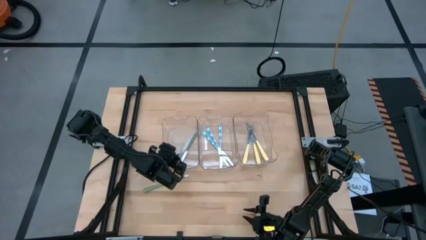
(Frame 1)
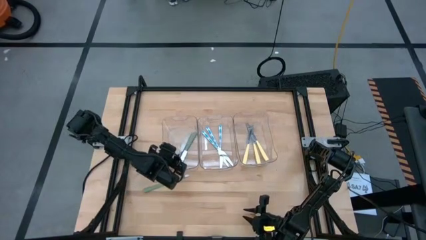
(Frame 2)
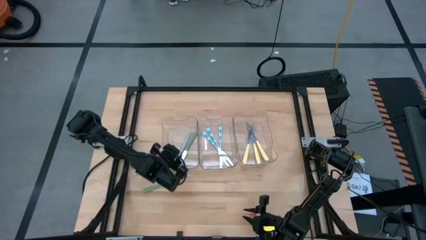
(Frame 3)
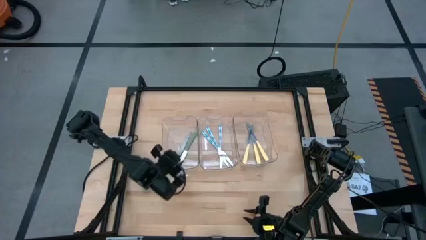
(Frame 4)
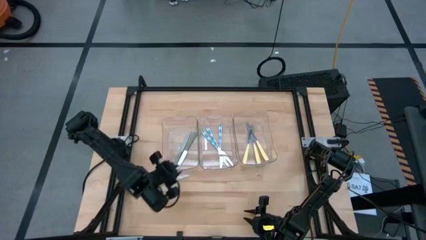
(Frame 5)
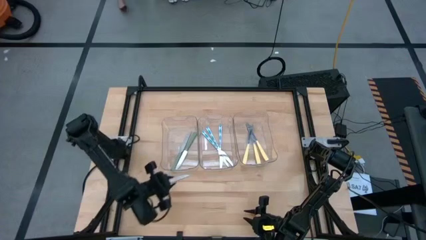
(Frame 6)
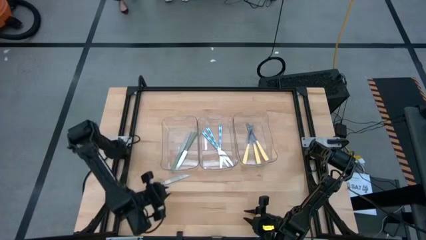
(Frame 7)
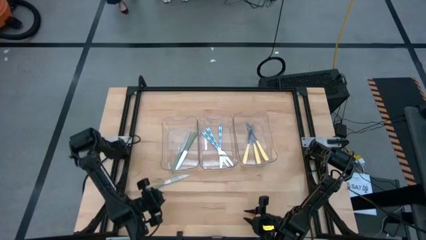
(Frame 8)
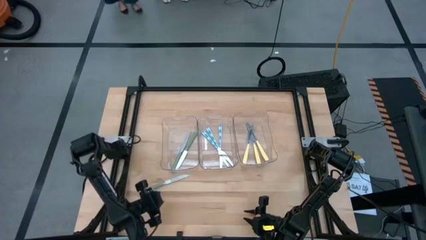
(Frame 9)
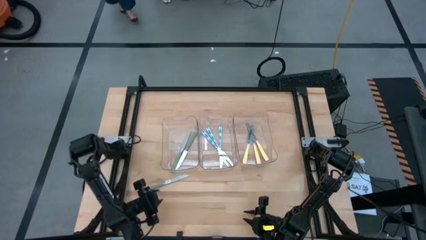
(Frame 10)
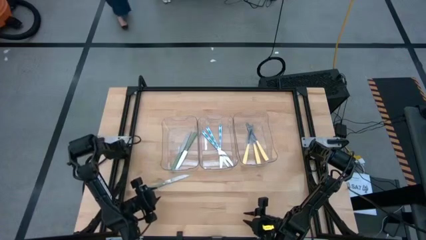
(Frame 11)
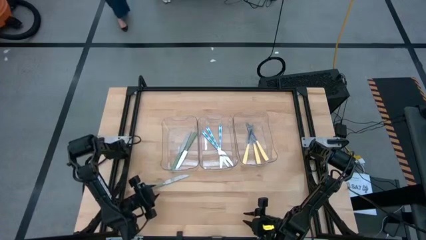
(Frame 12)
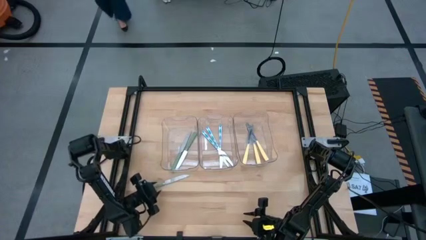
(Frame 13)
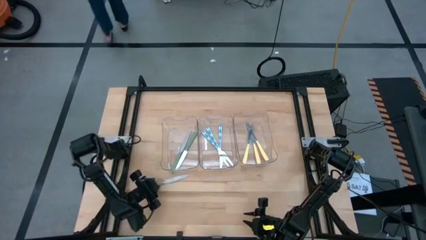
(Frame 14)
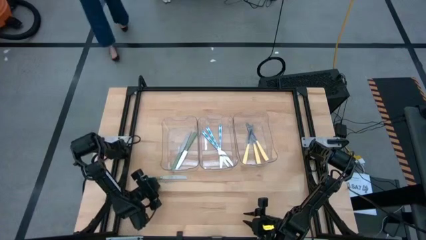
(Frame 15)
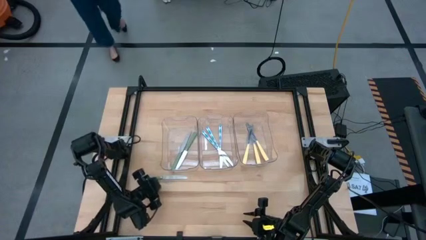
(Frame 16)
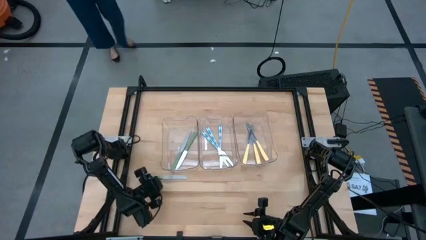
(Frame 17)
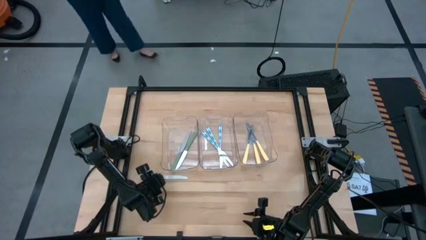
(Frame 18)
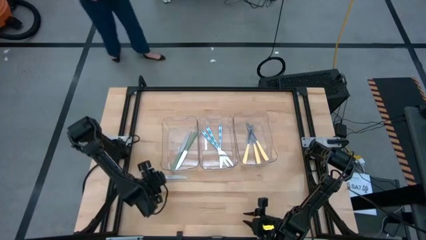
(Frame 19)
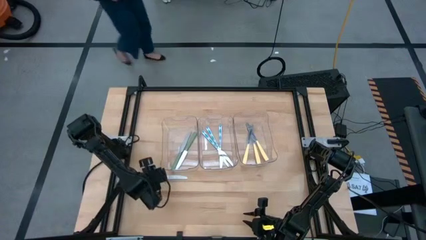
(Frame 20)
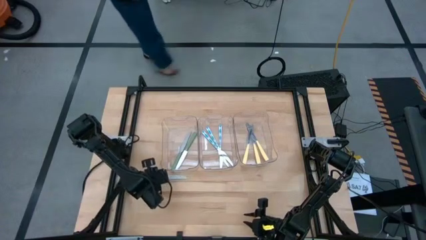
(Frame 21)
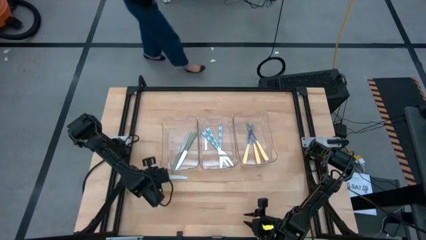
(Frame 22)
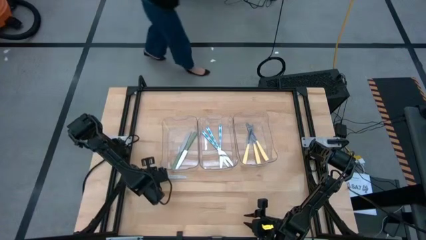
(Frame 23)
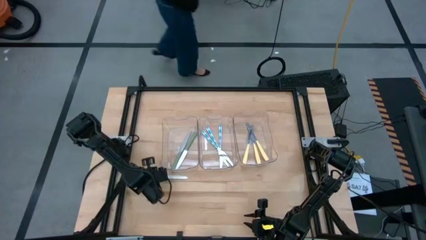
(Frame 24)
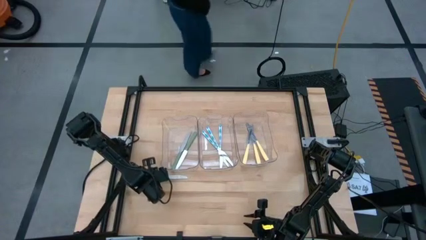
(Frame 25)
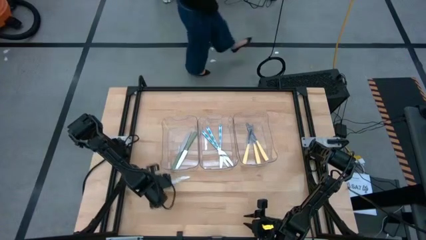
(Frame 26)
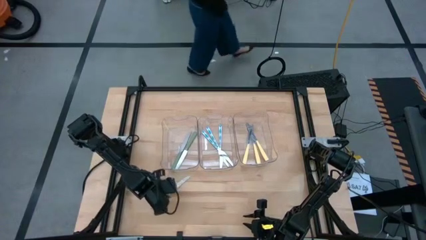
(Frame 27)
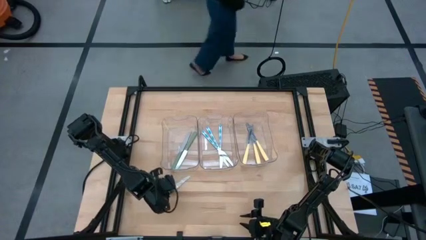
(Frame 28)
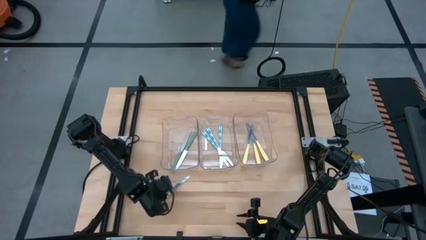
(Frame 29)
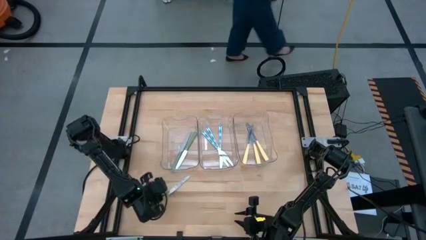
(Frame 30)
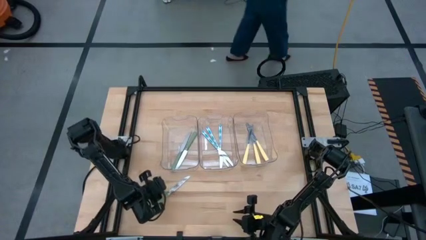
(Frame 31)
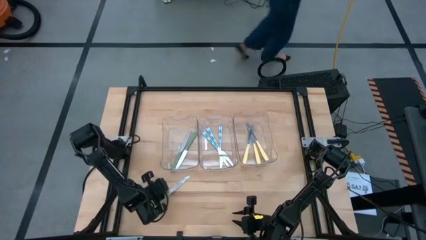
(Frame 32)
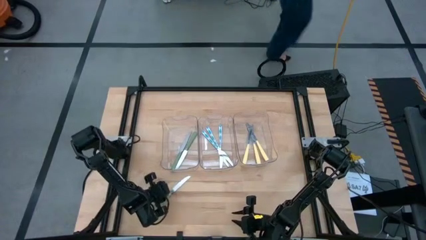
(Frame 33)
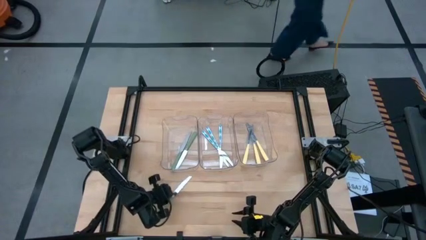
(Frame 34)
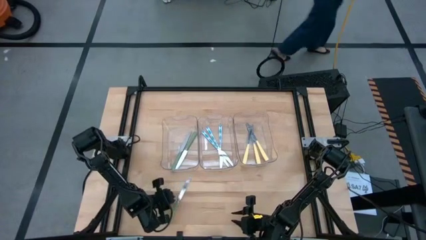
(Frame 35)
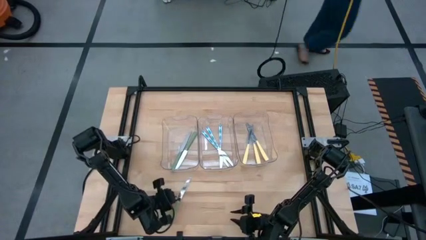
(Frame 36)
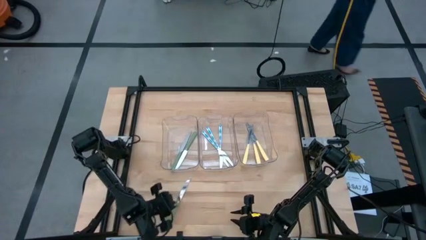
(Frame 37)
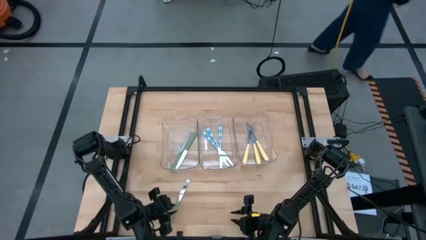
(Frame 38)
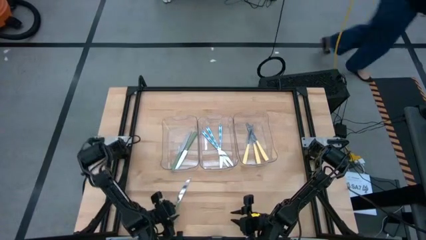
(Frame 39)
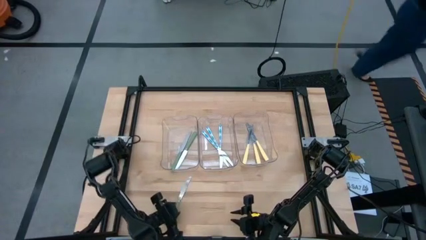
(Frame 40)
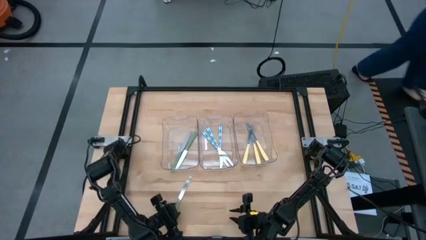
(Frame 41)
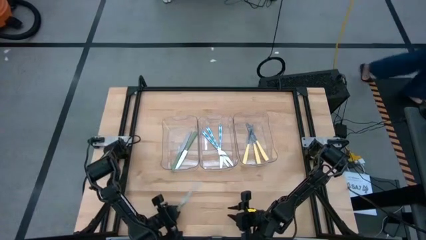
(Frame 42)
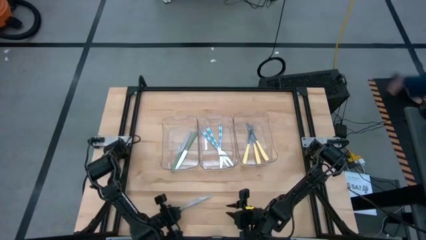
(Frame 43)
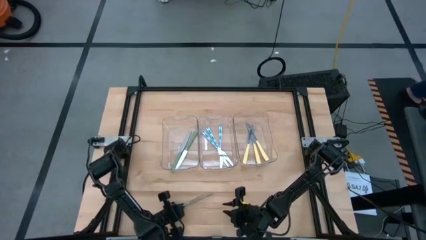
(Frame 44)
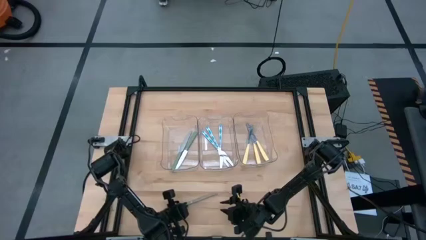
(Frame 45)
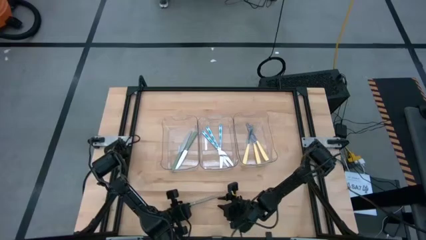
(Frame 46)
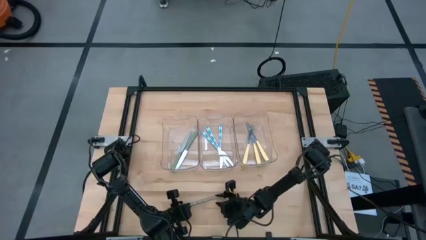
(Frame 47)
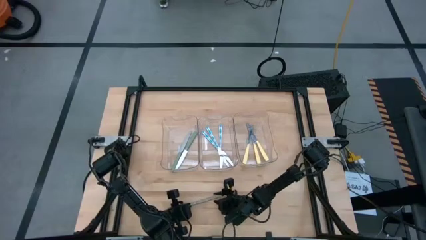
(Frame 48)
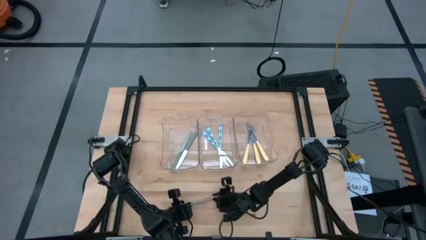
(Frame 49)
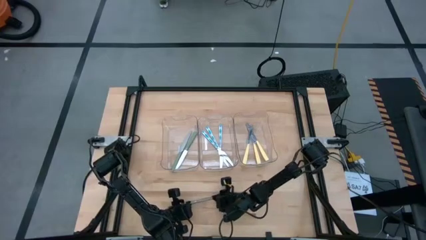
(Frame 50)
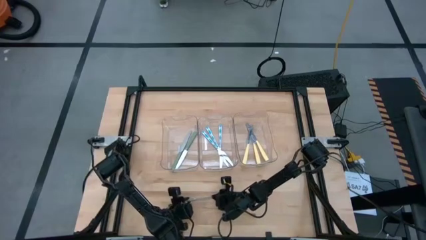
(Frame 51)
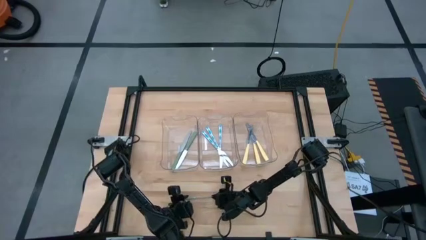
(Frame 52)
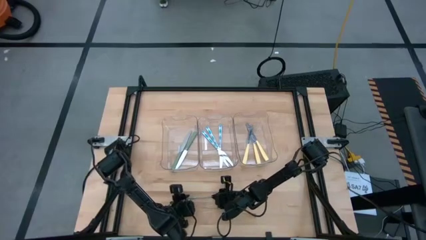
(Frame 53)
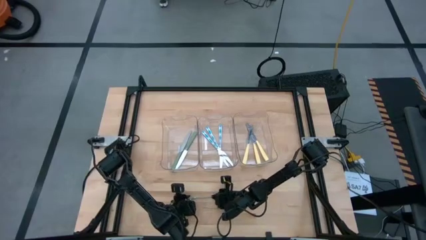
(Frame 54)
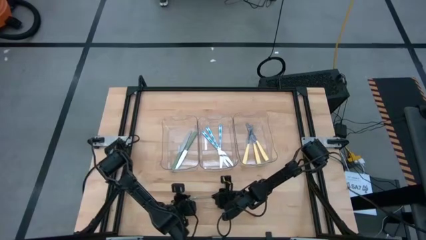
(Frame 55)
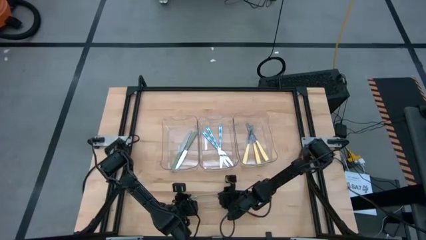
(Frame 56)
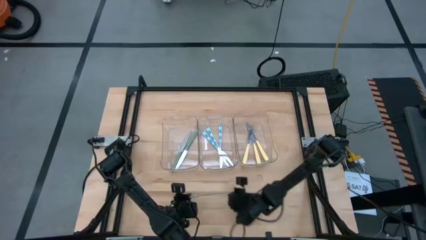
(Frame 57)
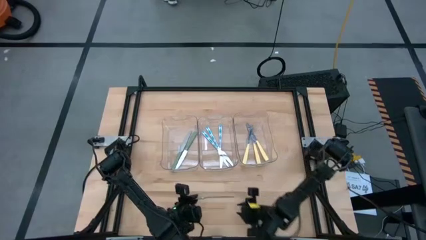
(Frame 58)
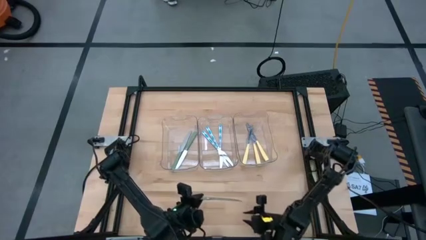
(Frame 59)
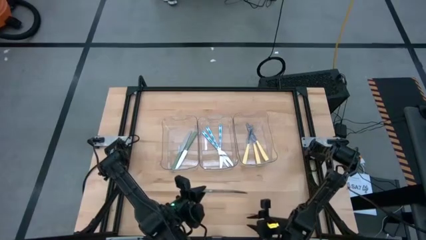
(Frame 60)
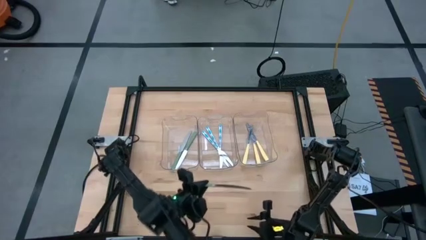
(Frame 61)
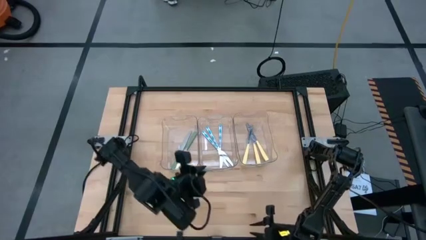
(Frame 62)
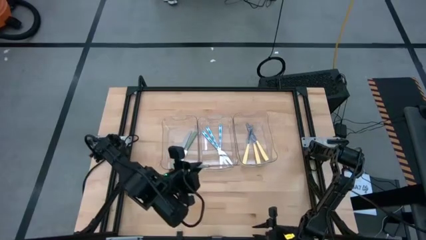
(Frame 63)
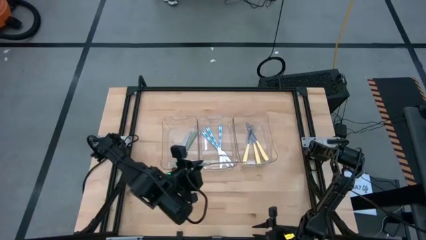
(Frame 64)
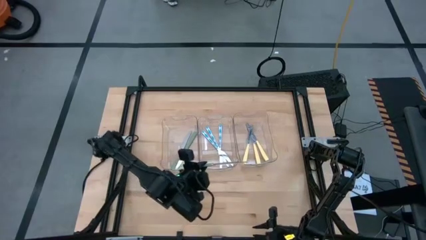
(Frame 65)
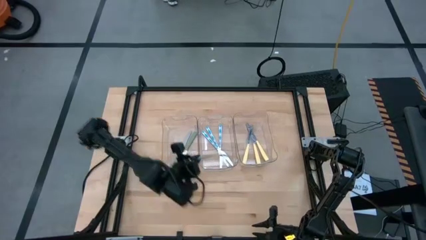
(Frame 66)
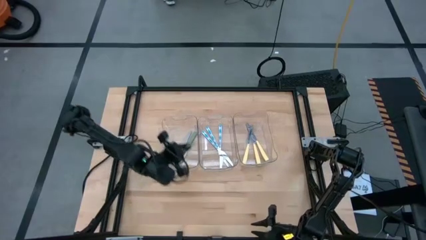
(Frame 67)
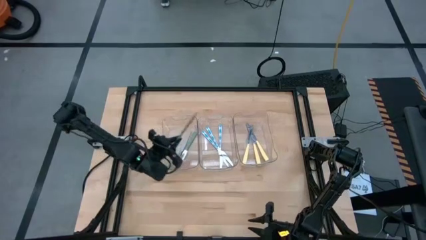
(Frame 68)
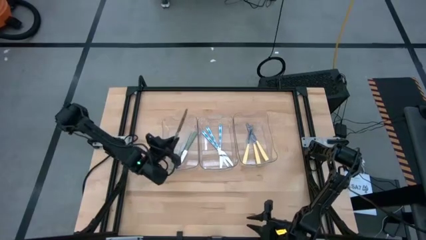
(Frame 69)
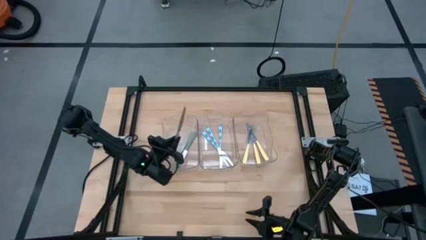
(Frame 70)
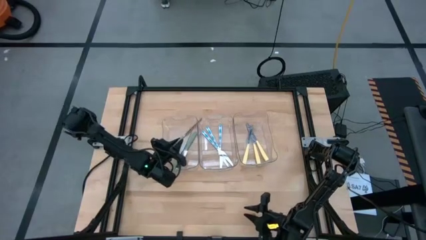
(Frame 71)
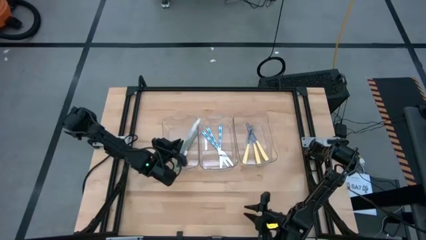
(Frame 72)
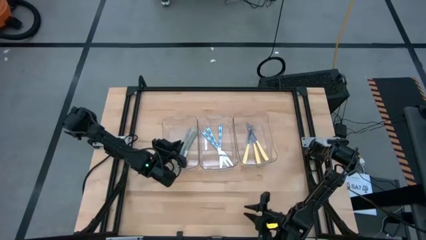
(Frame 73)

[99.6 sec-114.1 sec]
Task: Sort silverware by color (type)
Put the green knife into the left transparent bin
